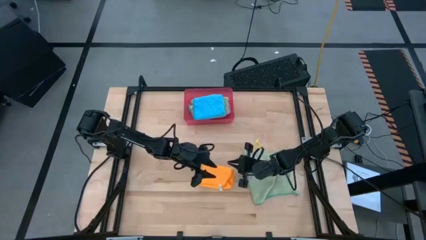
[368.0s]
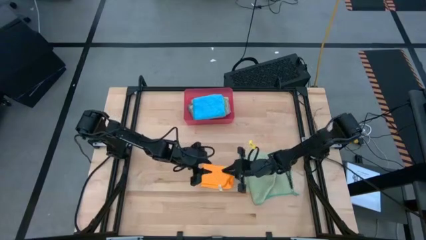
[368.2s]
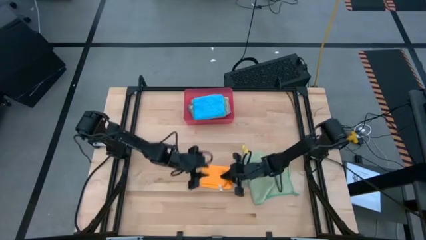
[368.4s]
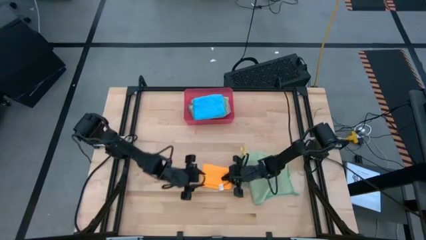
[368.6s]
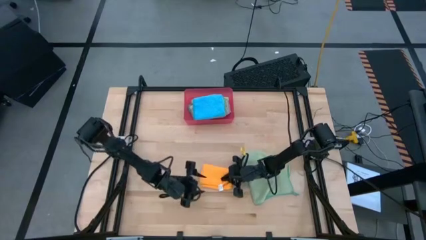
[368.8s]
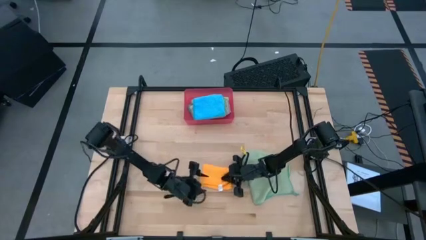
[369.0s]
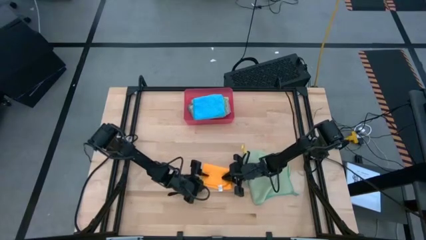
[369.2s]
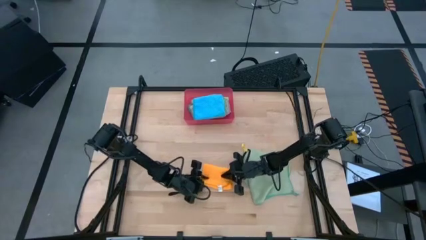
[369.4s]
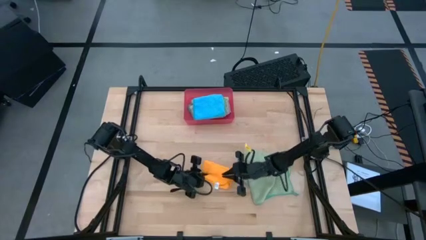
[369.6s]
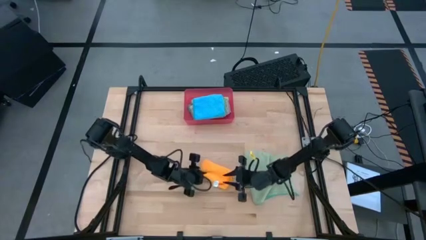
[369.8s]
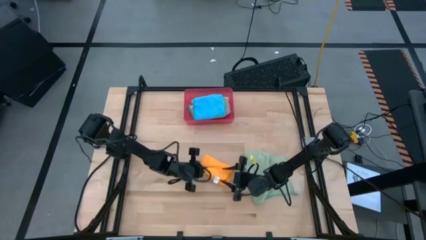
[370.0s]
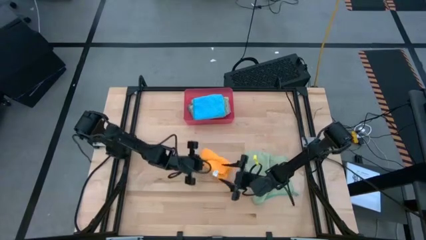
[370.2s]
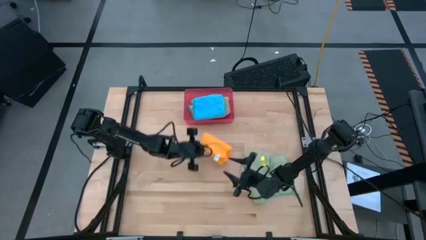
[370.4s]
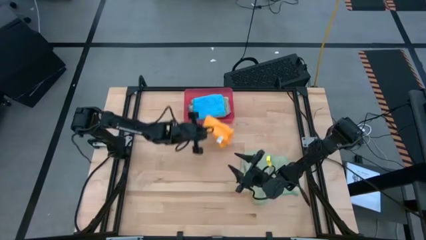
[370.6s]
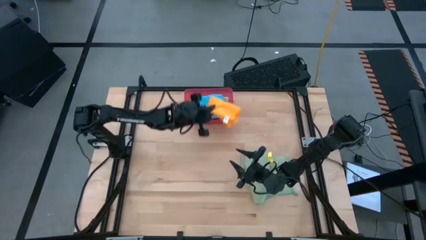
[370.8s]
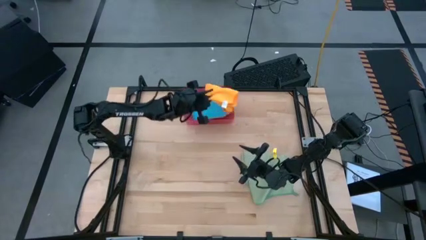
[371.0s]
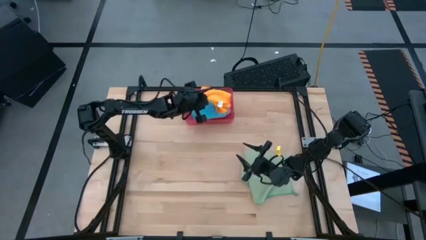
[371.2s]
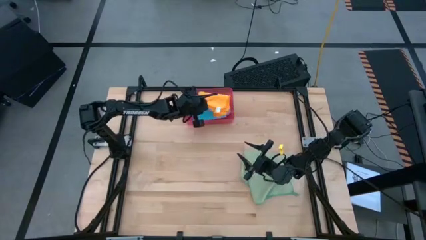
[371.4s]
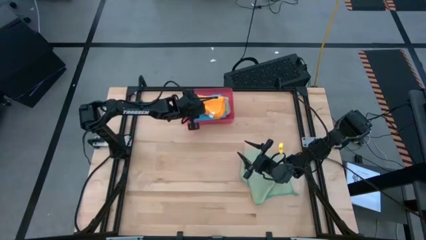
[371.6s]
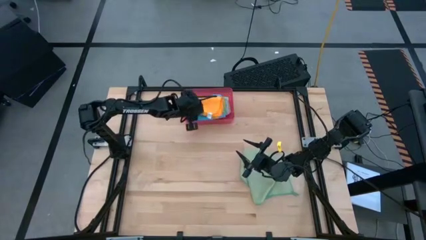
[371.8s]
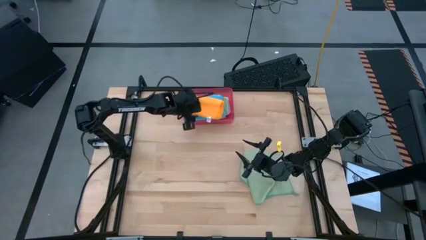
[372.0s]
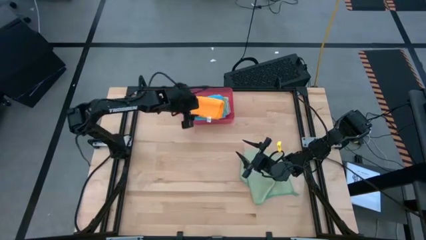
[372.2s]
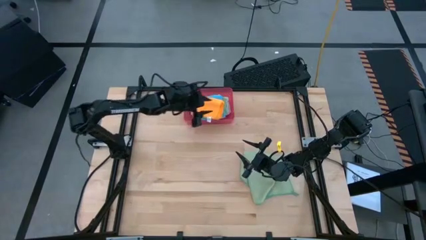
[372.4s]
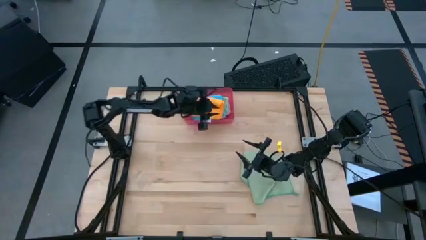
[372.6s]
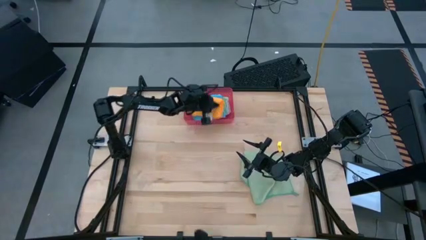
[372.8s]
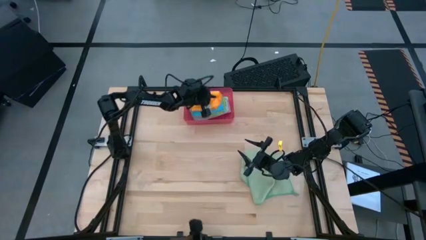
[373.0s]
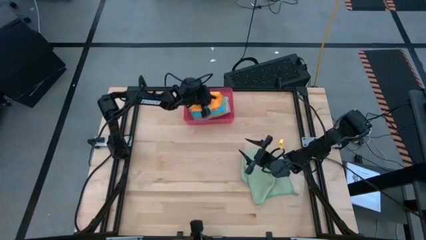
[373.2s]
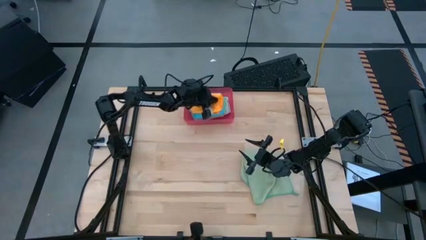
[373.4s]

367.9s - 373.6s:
Task: Fold microfiber towels
Stack the folded yellow towel on top of the folded blue towel in the red bin

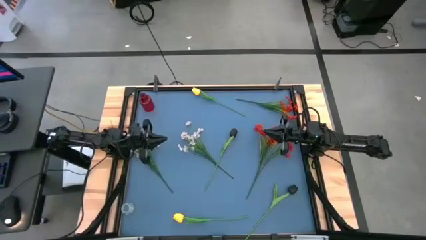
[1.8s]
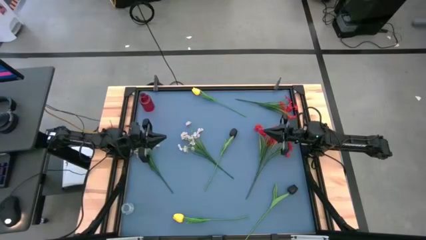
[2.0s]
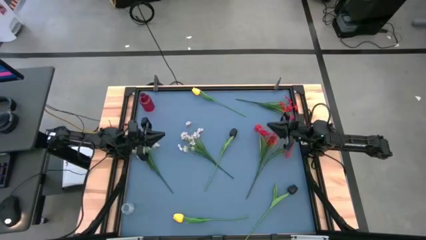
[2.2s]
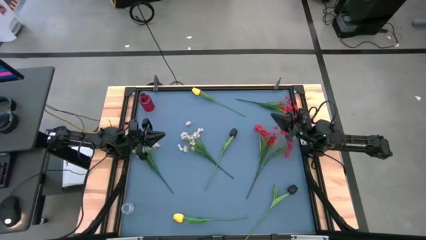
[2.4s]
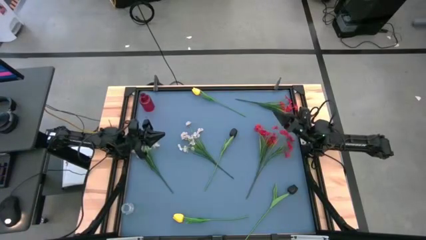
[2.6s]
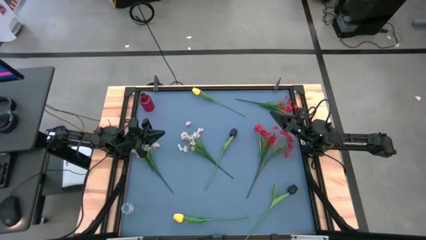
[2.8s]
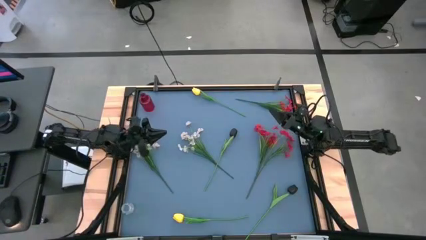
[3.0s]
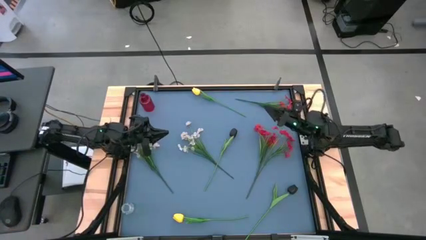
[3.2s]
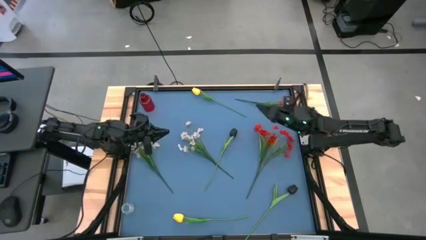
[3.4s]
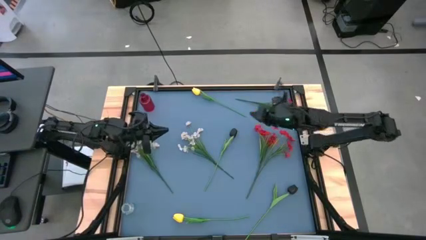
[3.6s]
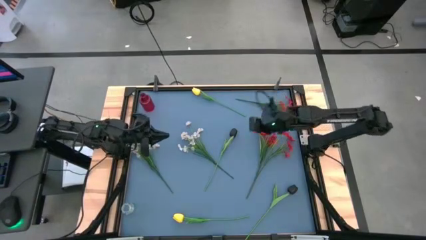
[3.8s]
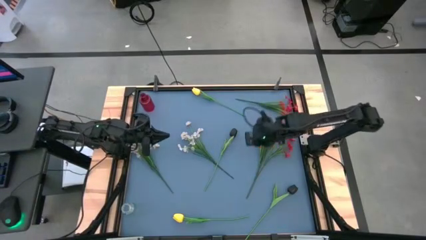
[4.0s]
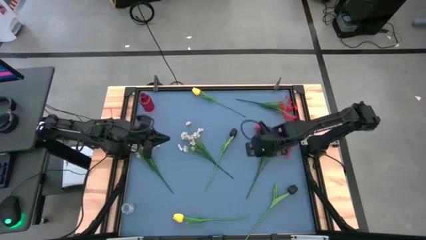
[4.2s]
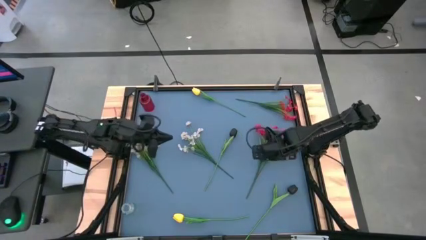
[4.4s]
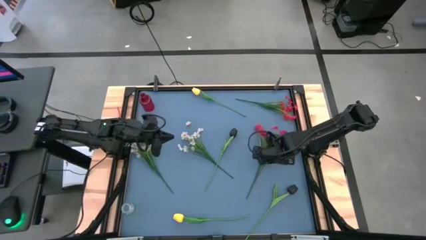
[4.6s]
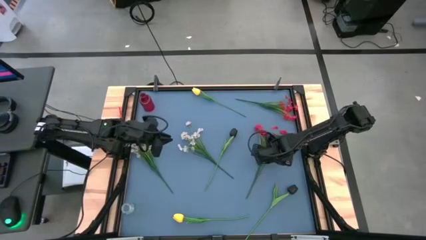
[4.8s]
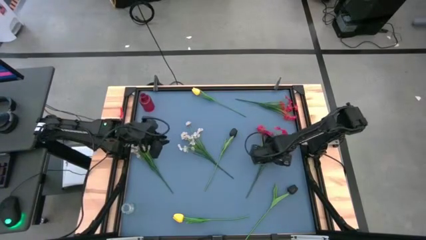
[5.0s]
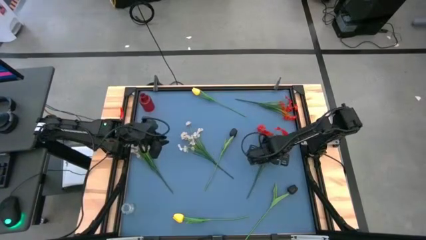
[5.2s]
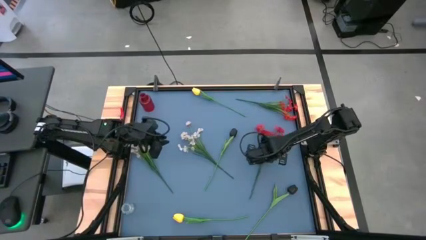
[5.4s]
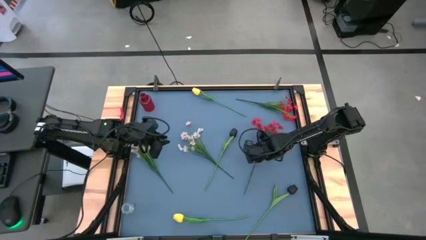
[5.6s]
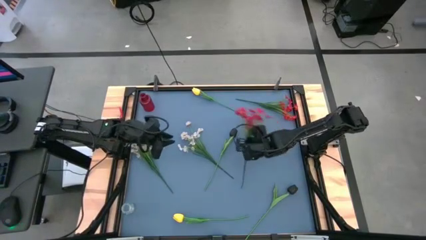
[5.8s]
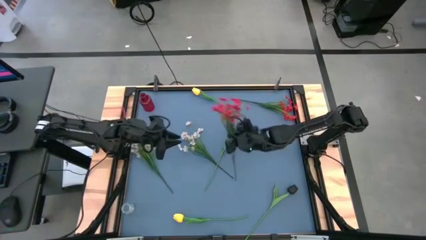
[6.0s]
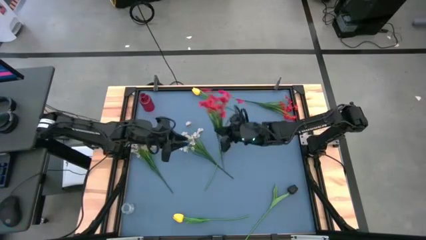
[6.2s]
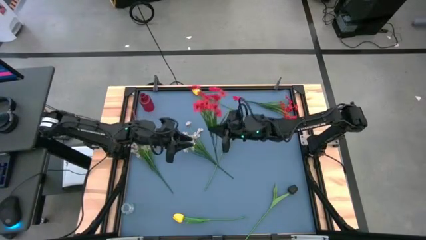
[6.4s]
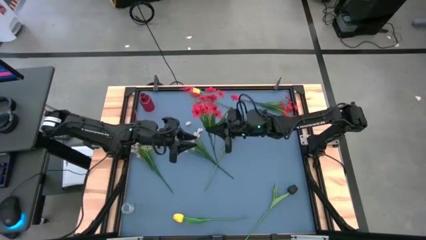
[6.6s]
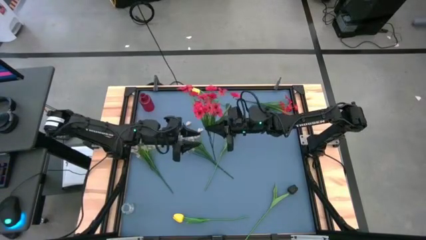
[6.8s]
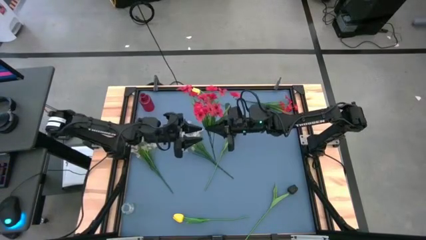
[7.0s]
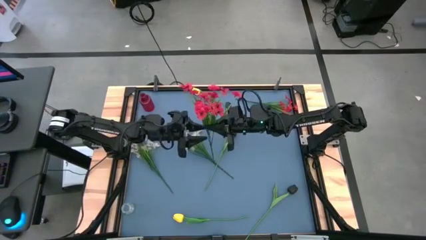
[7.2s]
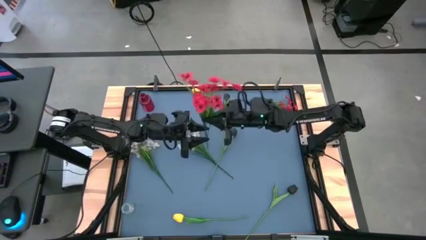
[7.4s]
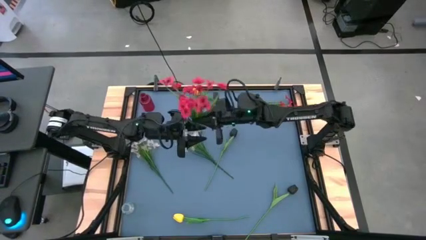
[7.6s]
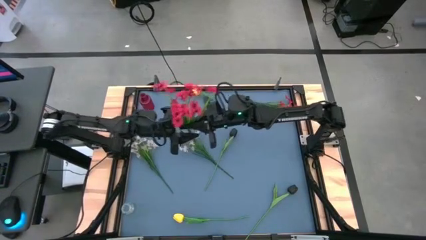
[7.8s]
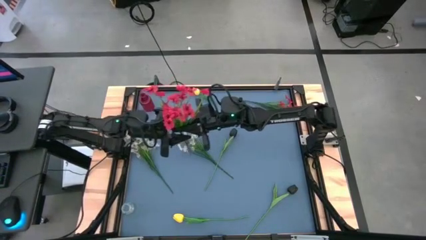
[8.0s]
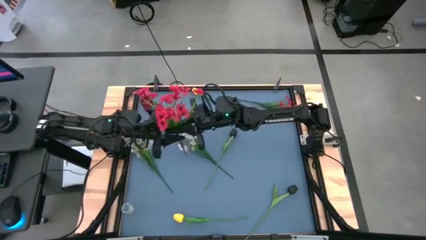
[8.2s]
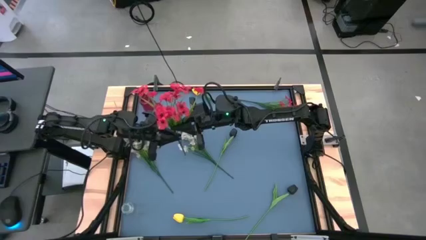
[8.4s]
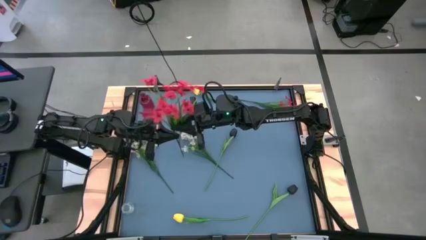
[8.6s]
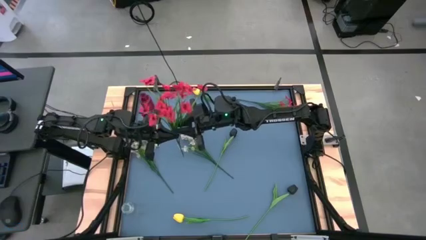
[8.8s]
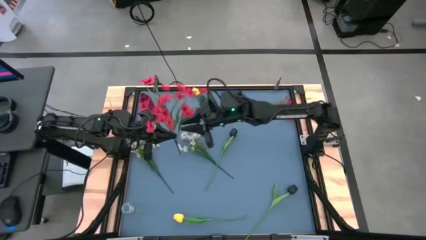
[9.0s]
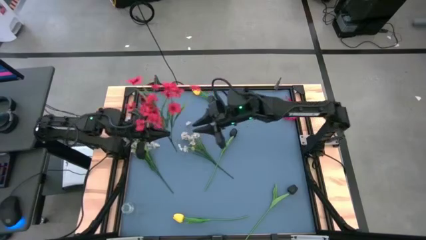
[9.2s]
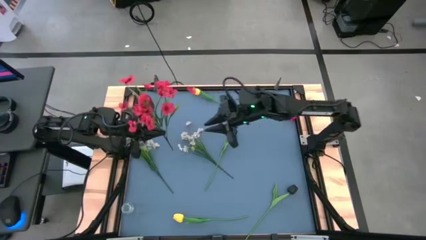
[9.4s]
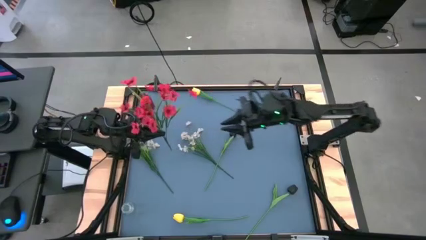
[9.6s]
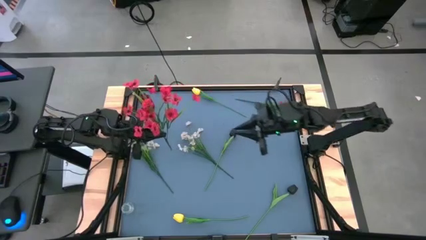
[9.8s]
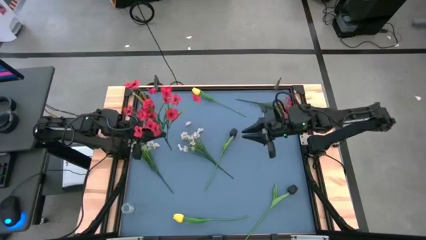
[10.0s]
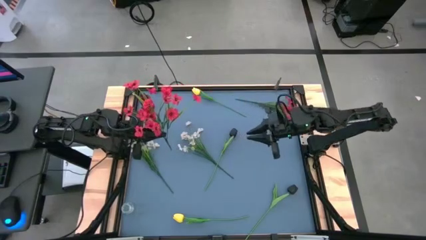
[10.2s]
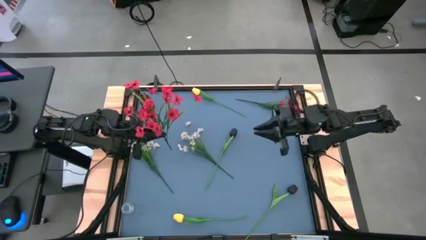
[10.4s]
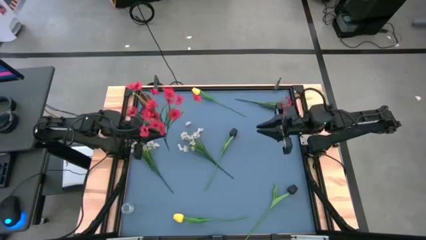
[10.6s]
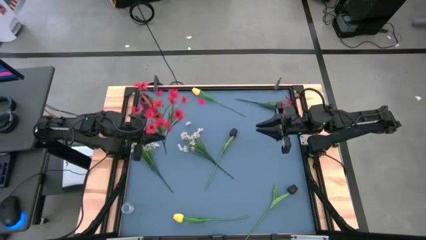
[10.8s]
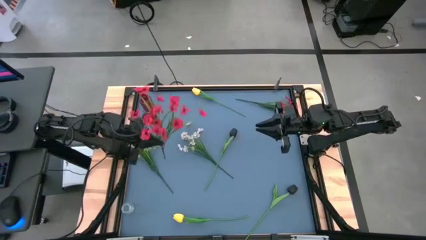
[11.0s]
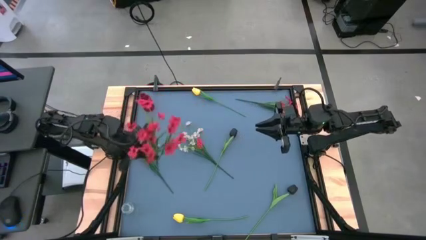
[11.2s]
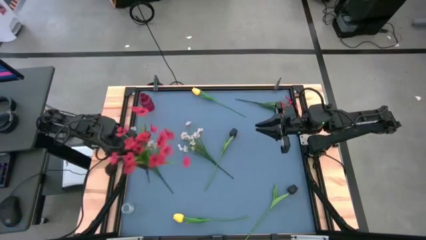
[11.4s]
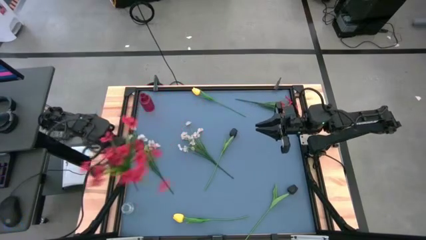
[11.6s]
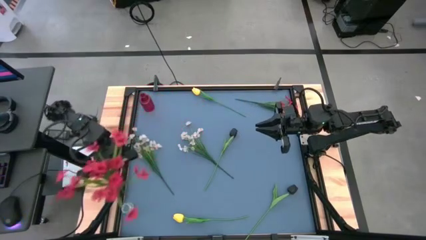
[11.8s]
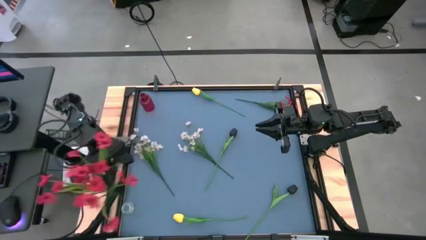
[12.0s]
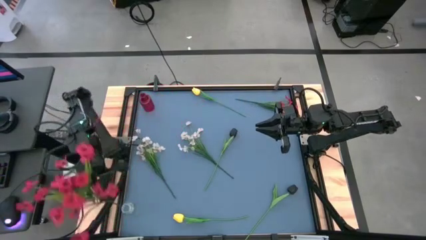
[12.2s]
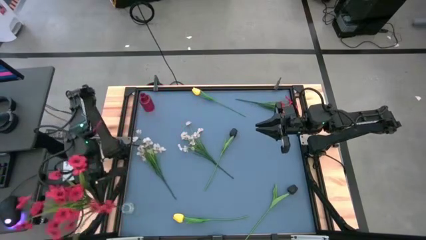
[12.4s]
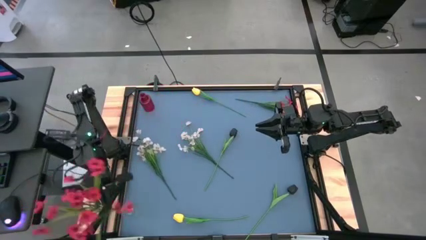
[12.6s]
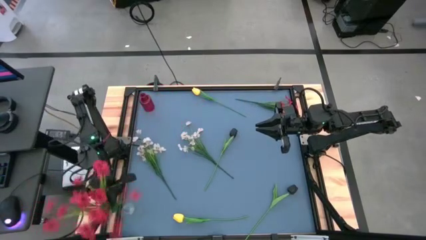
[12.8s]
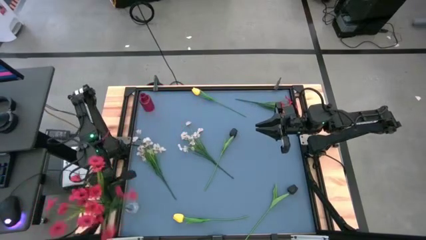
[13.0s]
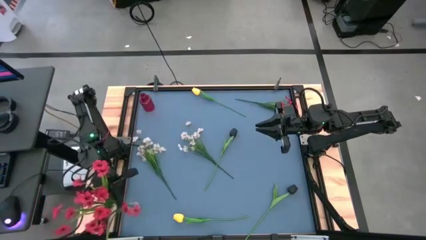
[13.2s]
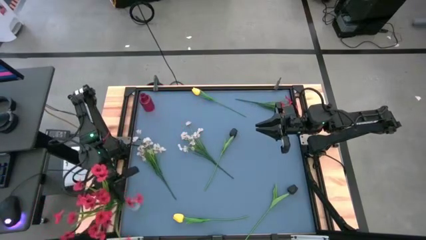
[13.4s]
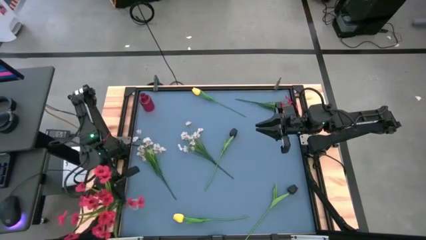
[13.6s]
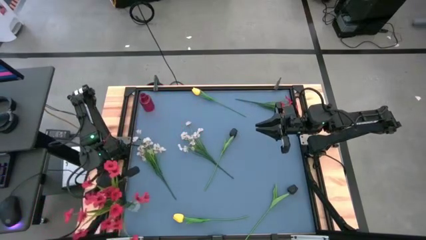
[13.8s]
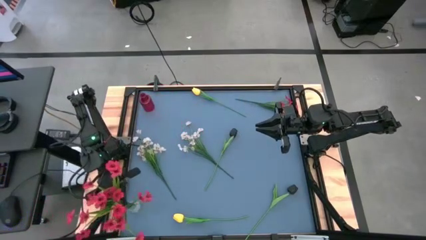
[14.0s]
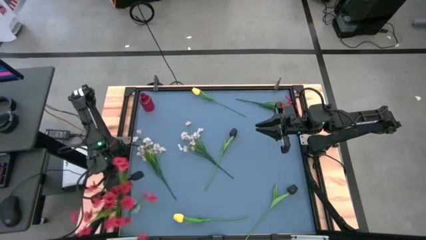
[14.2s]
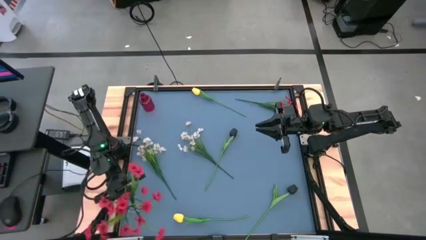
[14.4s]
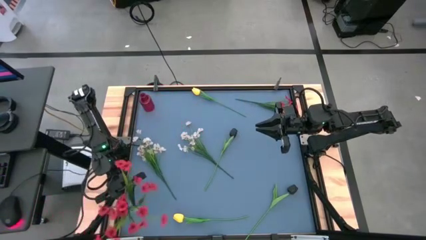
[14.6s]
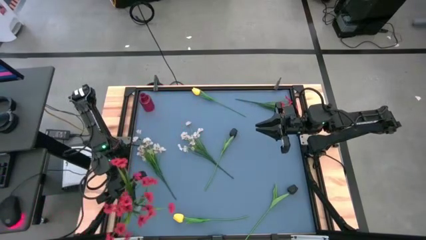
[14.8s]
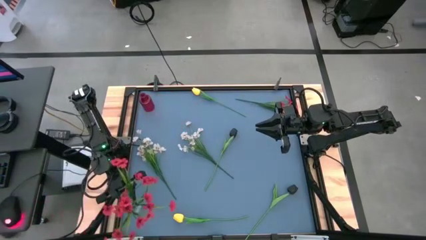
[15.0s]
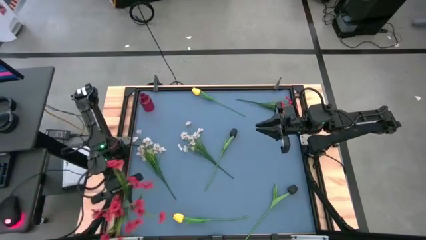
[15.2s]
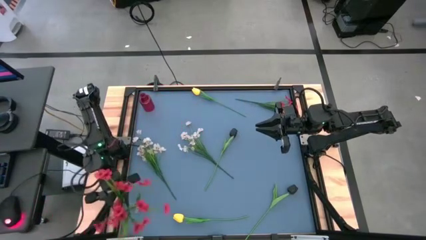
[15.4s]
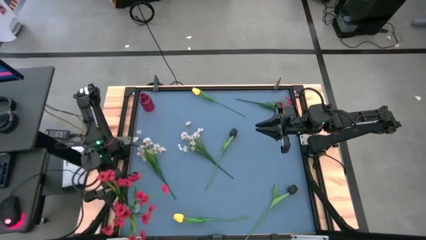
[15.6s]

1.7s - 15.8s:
Task: Sort flowers into vase by color
Put the bottom red flowers into the transparent vase
